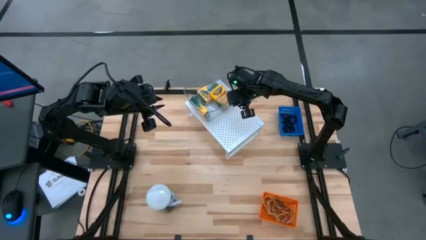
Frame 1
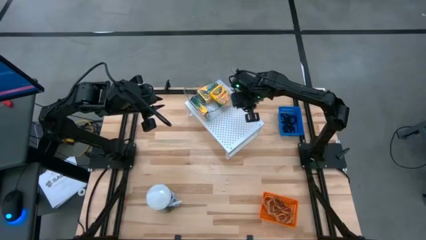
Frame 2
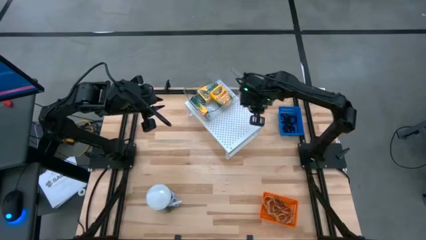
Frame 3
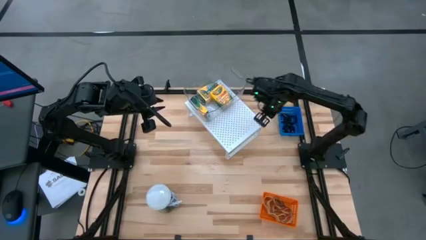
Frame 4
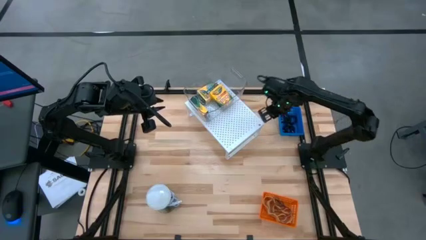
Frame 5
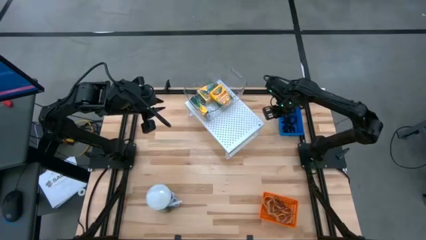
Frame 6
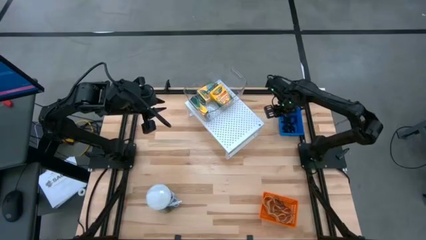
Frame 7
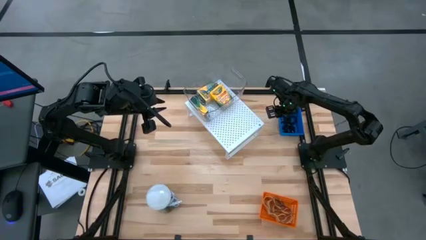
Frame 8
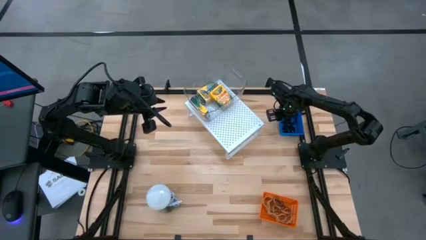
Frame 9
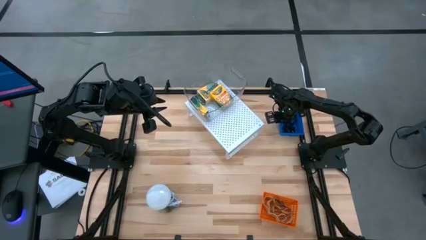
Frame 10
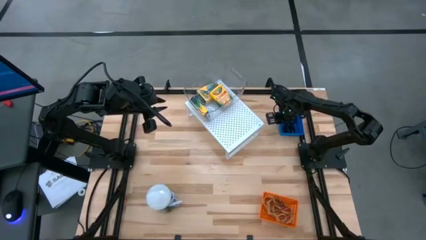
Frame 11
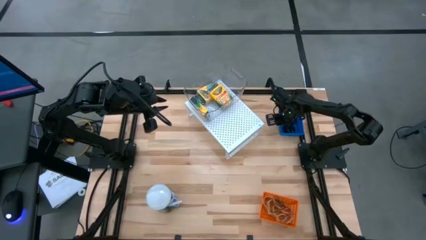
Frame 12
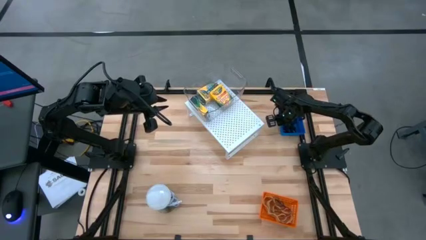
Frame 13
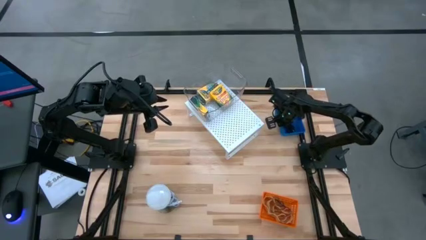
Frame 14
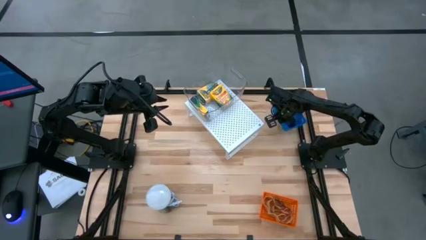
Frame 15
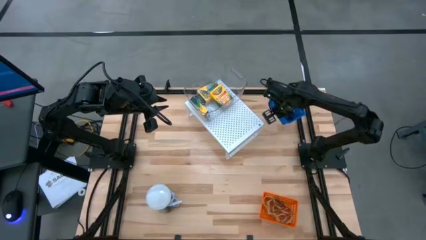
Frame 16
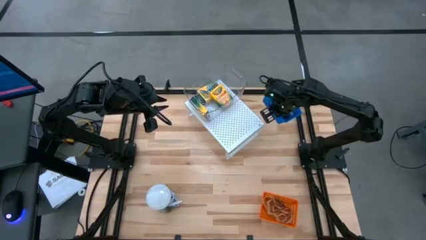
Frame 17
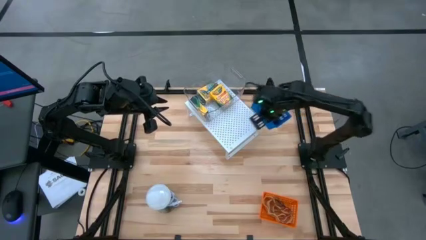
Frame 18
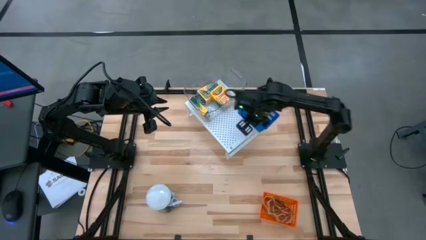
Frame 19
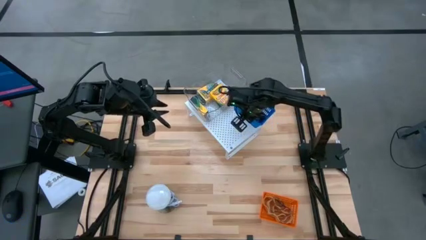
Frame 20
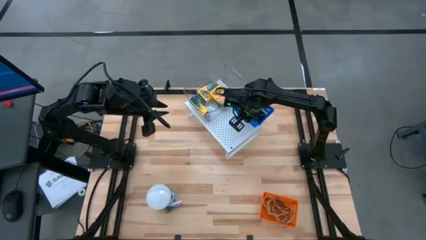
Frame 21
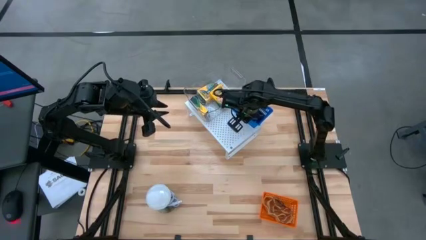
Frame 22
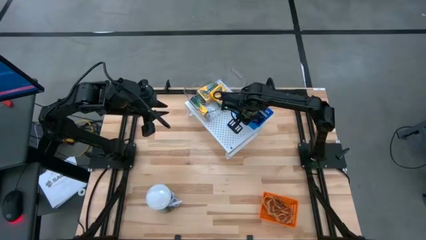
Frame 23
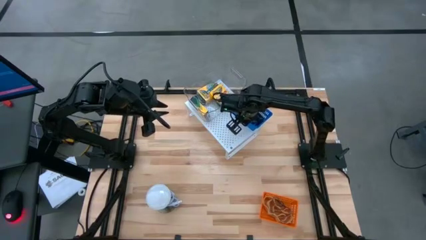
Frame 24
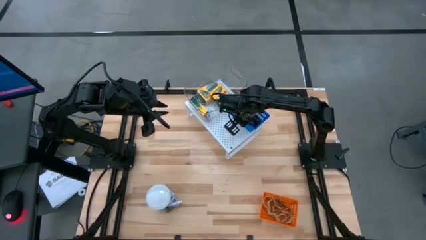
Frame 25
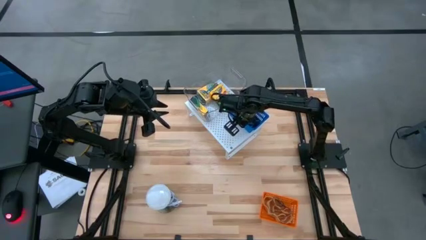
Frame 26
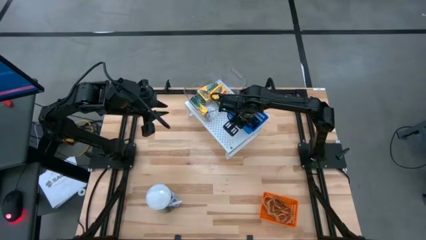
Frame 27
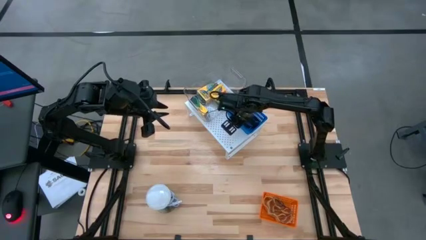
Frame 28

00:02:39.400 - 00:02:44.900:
Task: Pick & Place Office Desk Supplies
Put the blue bin on the shelf

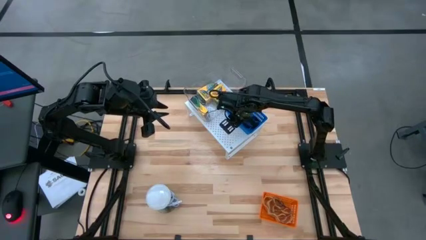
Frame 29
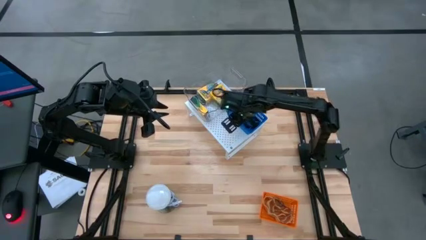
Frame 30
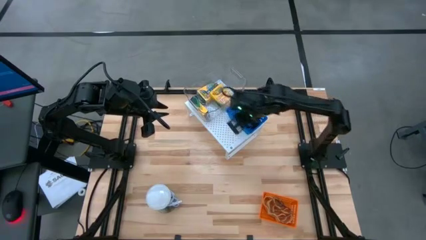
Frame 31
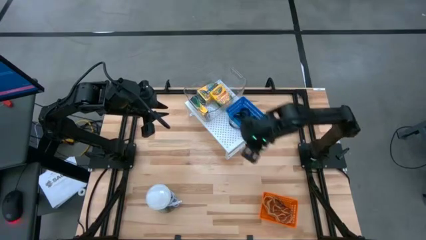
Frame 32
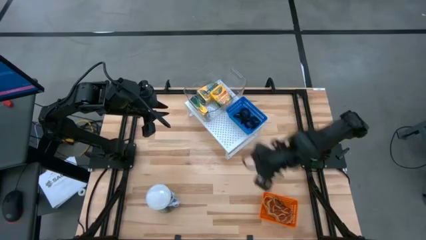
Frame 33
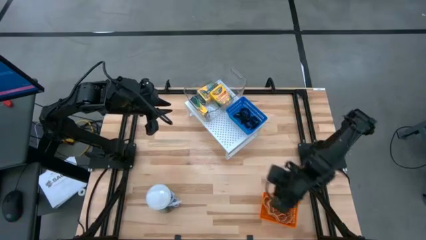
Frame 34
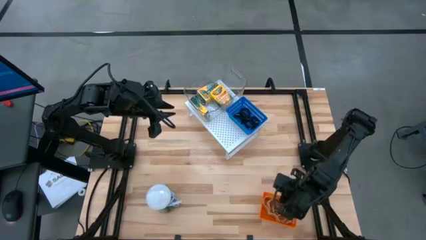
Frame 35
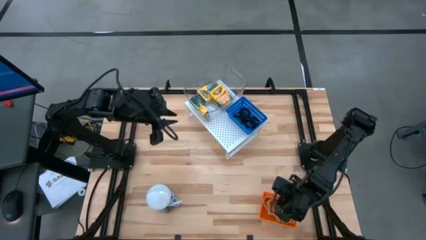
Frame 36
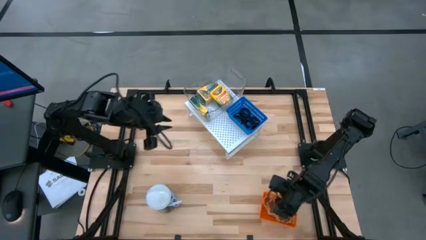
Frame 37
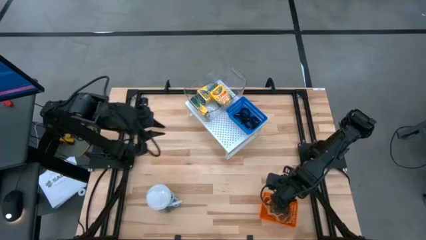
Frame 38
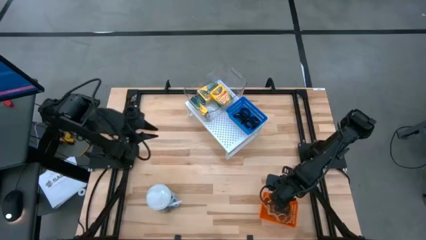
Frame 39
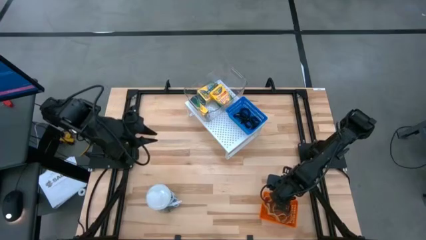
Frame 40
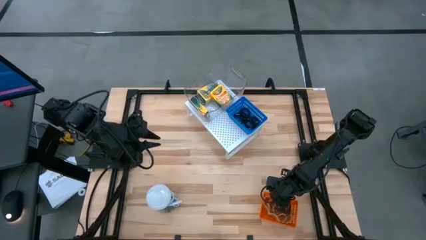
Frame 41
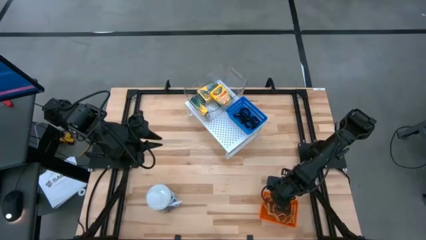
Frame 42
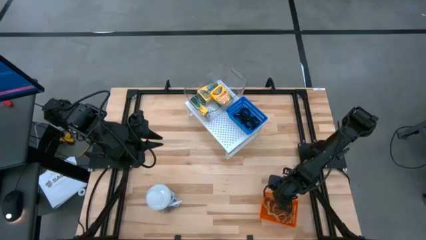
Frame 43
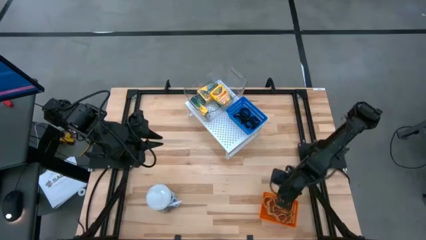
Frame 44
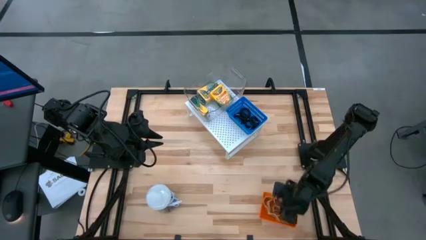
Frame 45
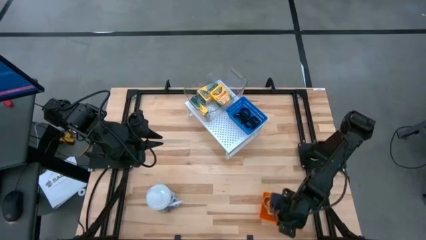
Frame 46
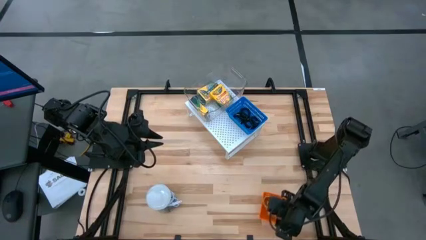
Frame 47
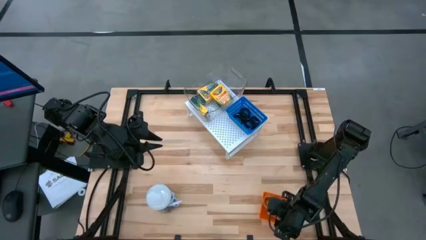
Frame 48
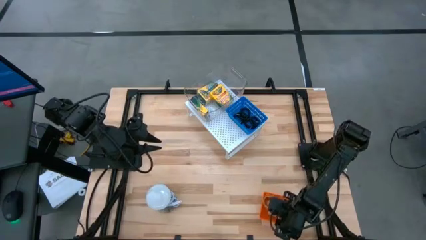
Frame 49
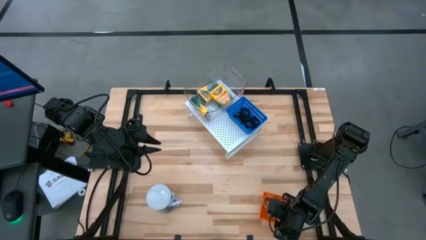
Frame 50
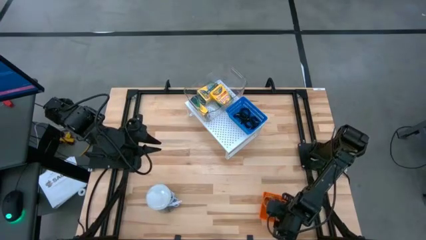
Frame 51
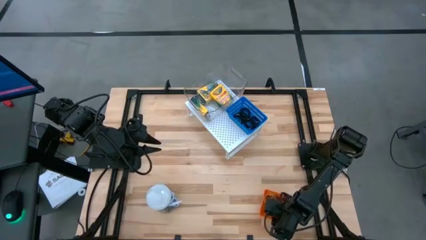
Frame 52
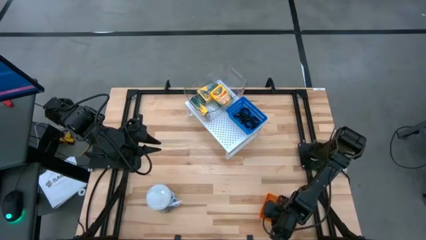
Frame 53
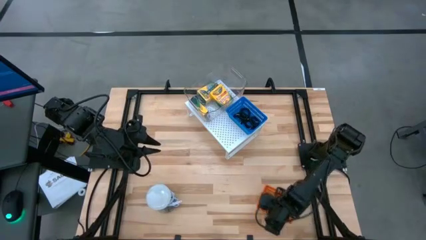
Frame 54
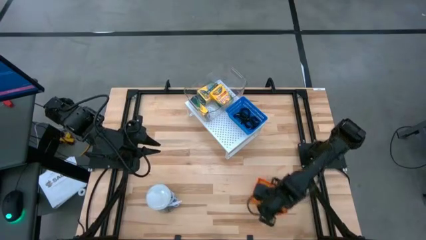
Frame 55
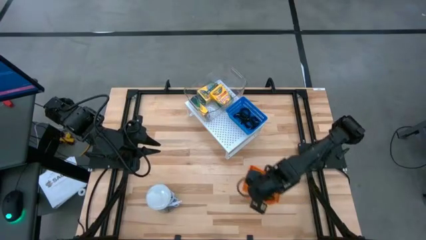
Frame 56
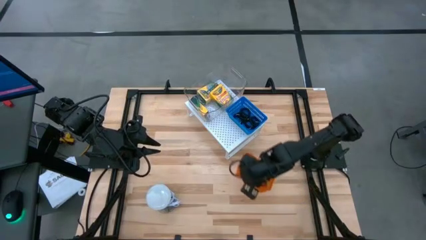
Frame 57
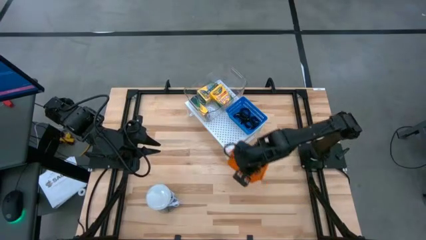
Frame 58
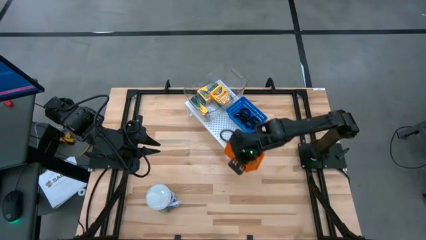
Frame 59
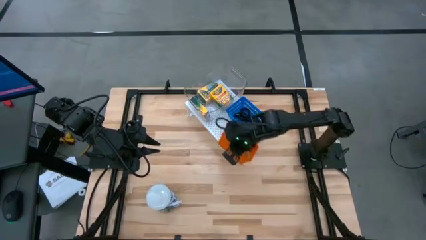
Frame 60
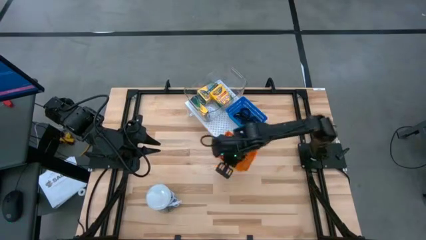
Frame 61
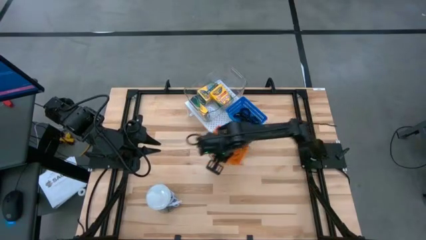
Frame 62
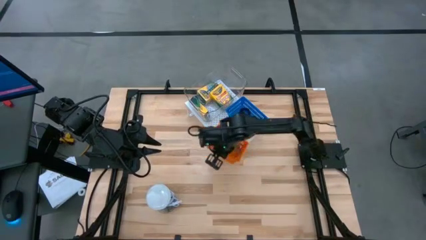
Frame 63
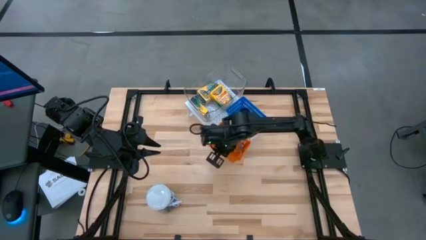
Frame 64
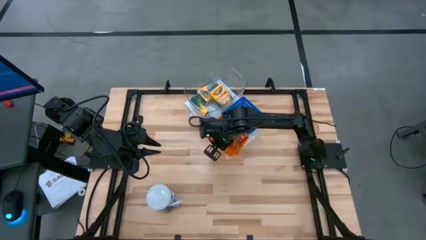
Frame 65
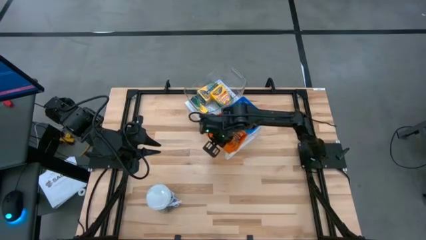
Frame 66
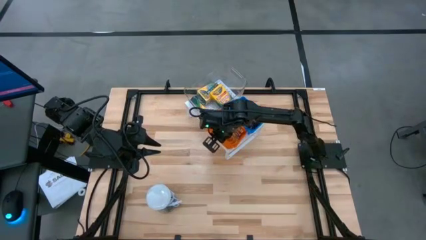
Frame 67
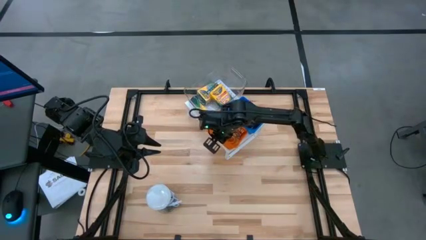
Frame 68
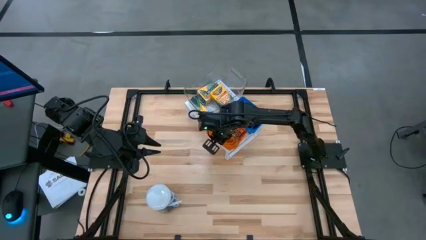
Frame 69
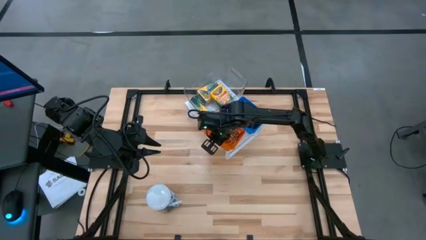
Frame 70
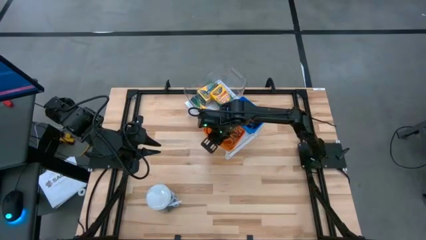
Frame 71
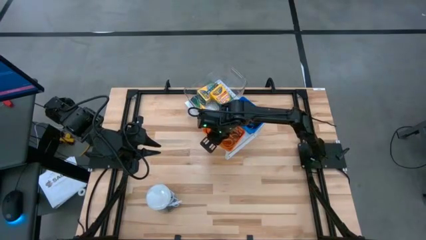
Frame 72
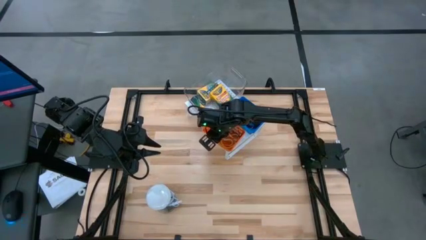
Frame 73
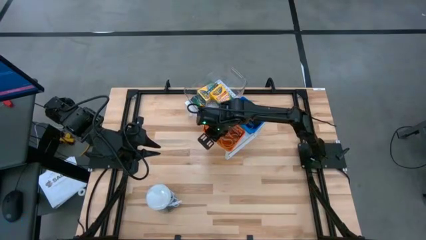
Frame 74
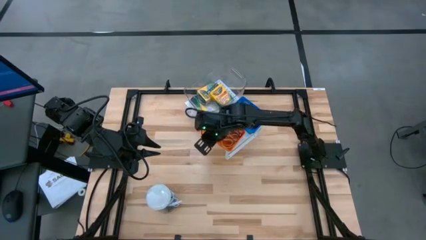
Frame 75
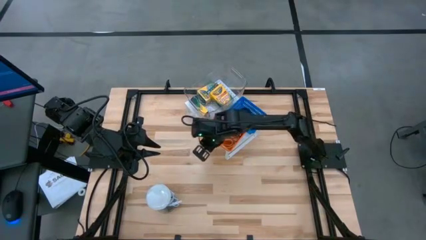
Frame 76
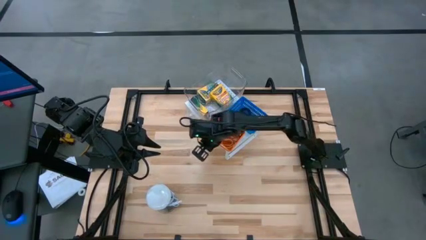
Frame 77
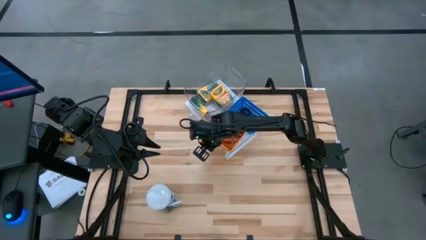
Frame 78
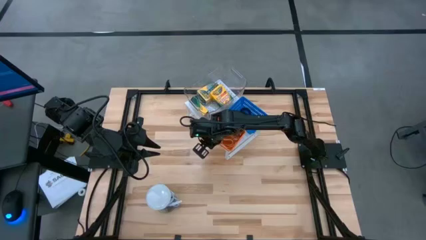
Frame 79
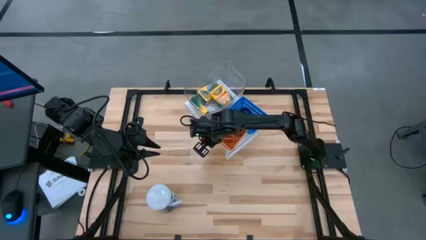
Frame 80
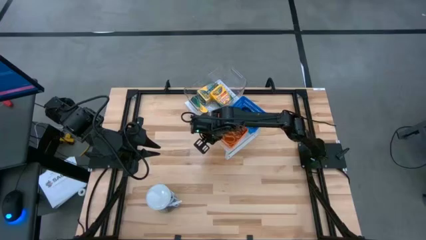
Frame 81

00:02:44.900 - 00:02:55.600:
Put the orange bin on the shelf

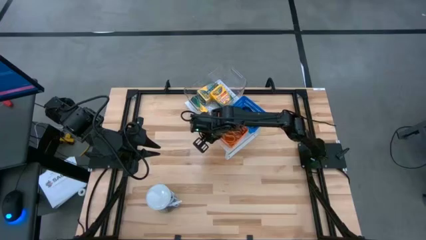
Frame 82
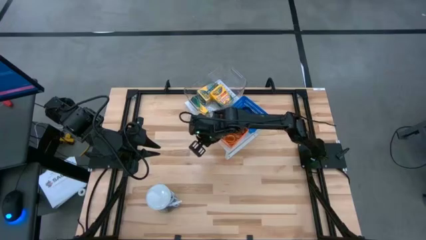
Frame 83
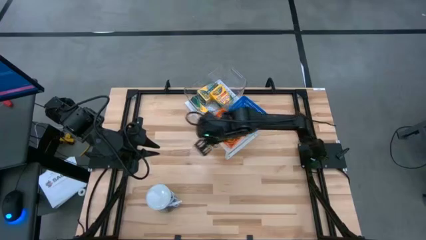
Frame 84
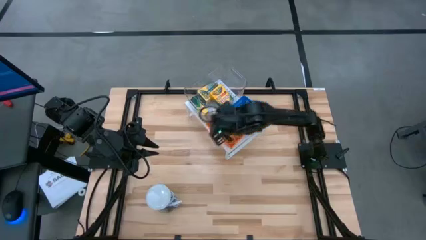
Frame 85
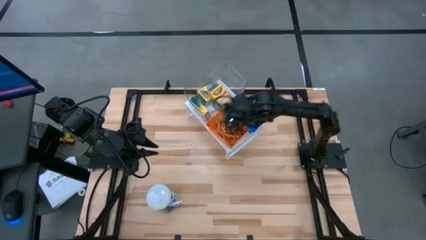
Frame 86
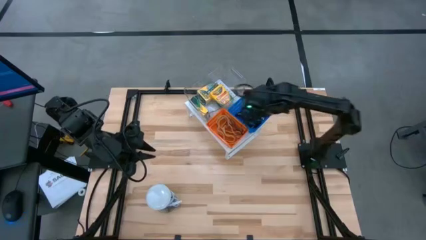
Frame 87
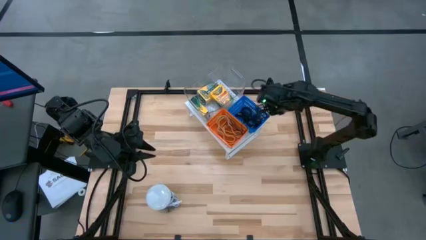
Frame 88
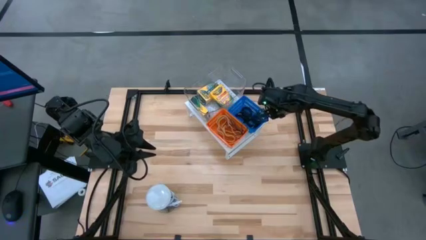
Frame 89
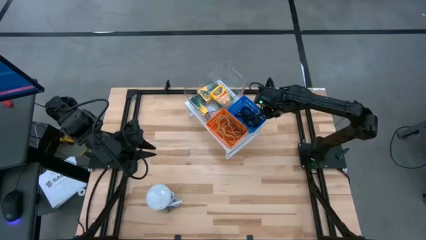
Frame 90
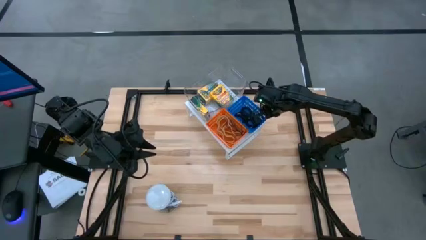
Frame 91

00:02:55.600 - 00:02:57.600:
Adjust the blue bin on the shelf
